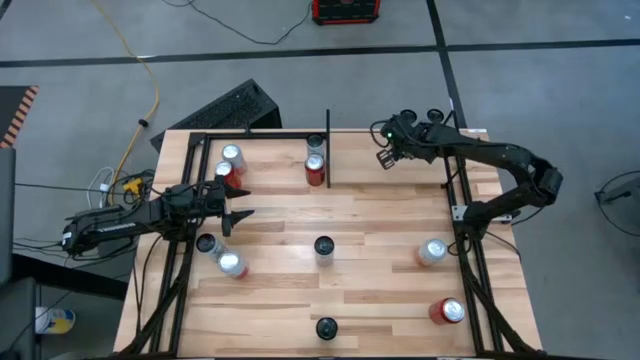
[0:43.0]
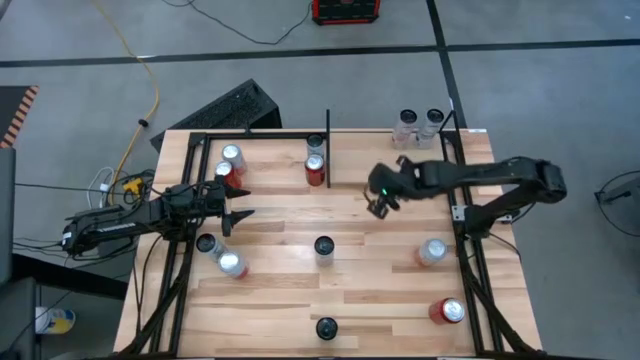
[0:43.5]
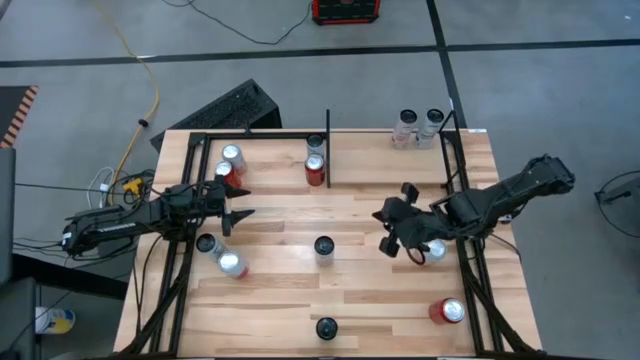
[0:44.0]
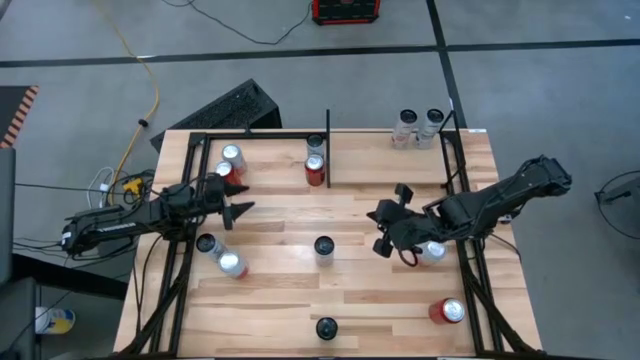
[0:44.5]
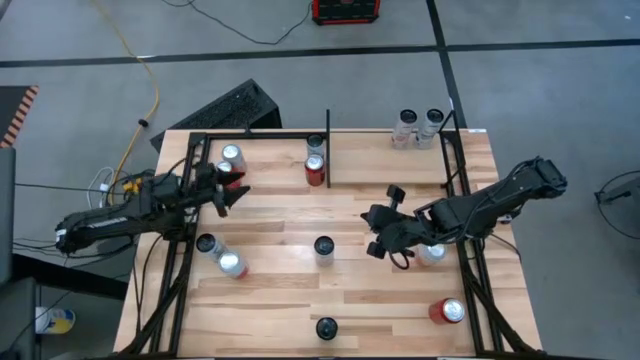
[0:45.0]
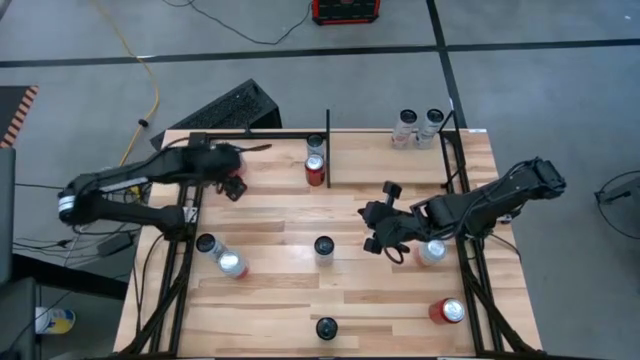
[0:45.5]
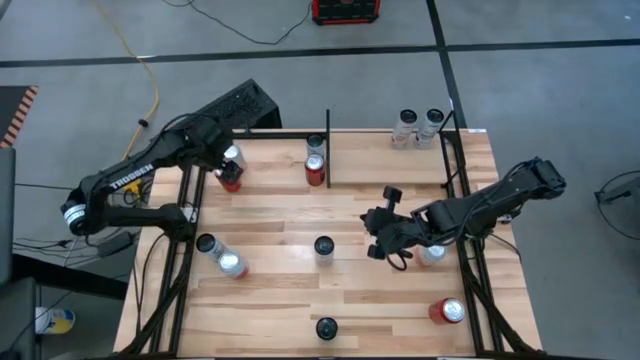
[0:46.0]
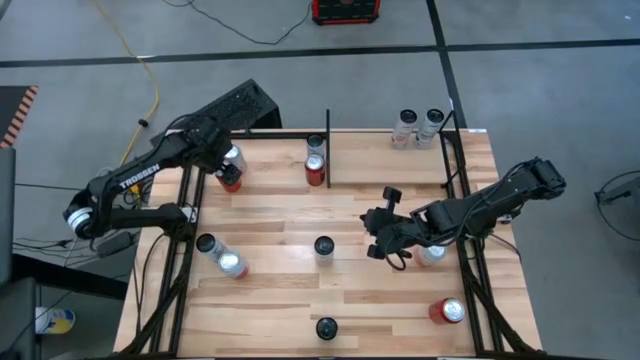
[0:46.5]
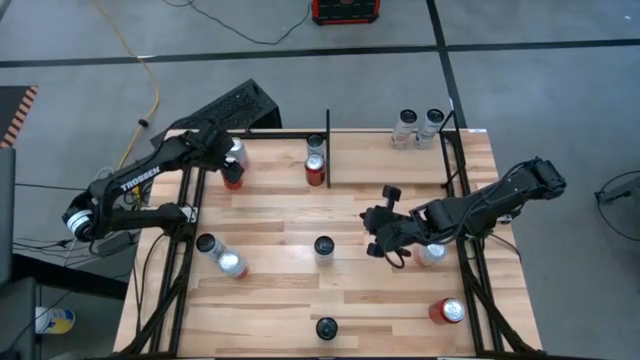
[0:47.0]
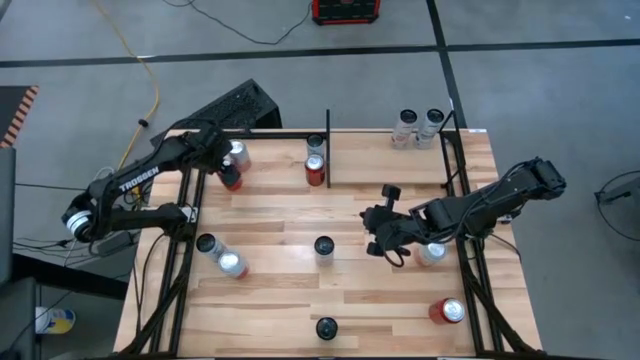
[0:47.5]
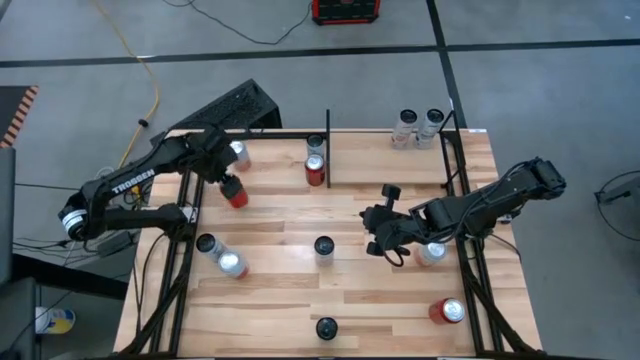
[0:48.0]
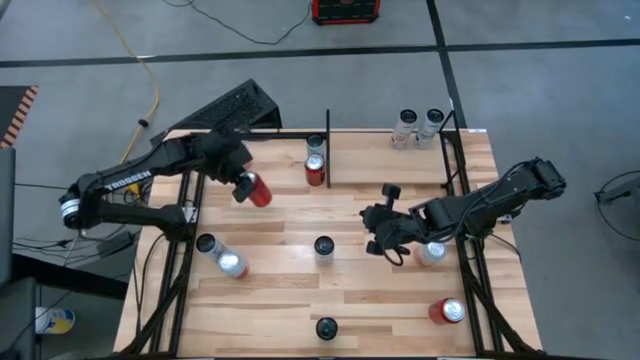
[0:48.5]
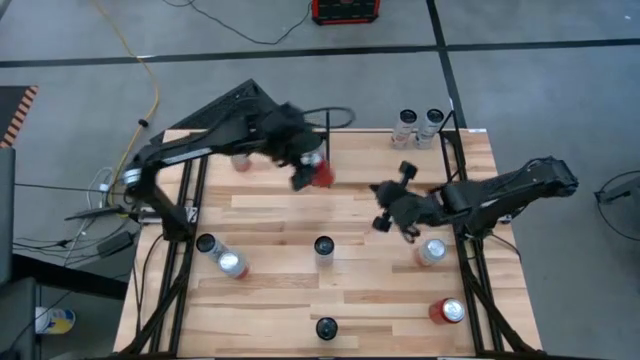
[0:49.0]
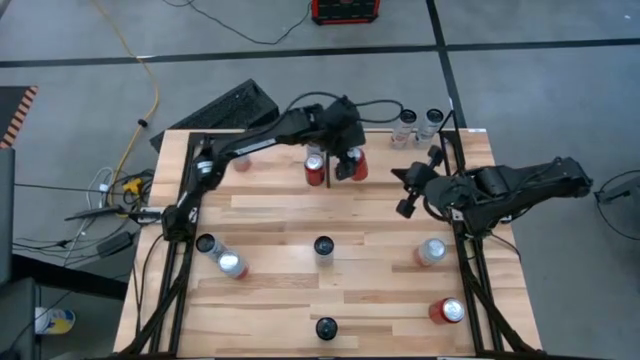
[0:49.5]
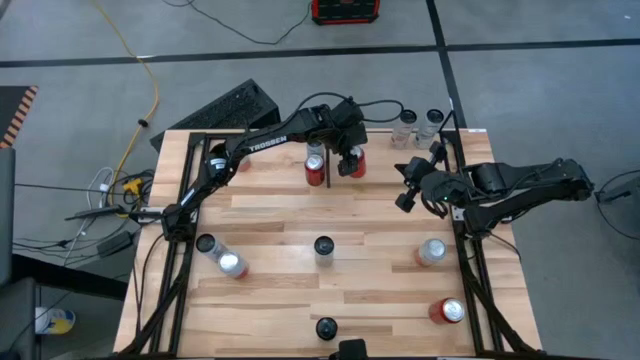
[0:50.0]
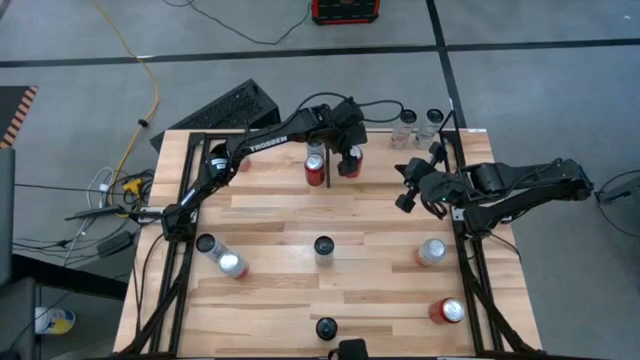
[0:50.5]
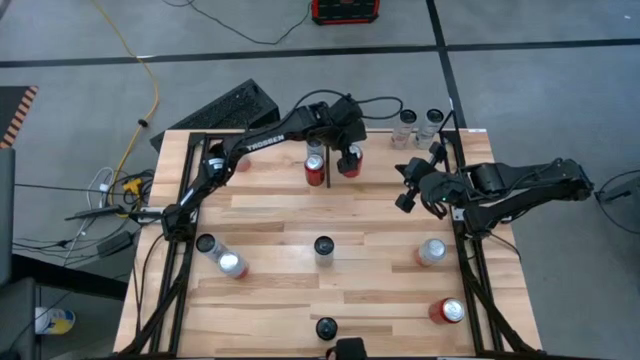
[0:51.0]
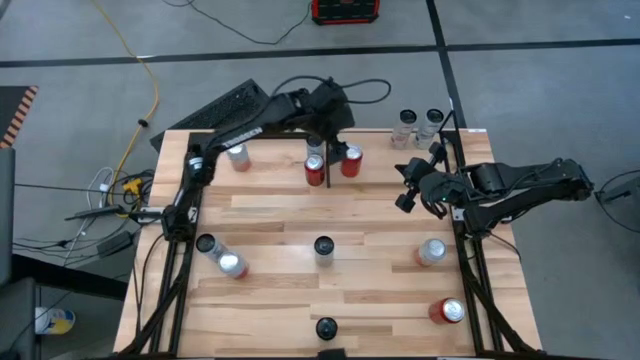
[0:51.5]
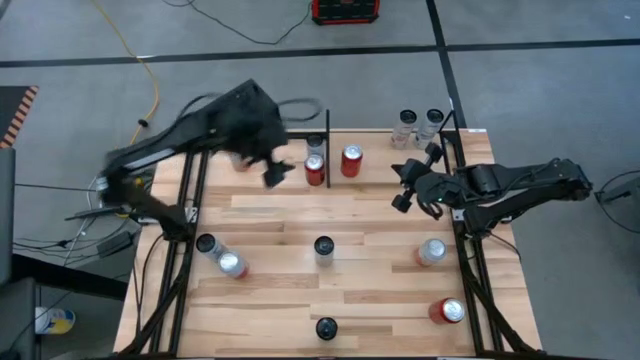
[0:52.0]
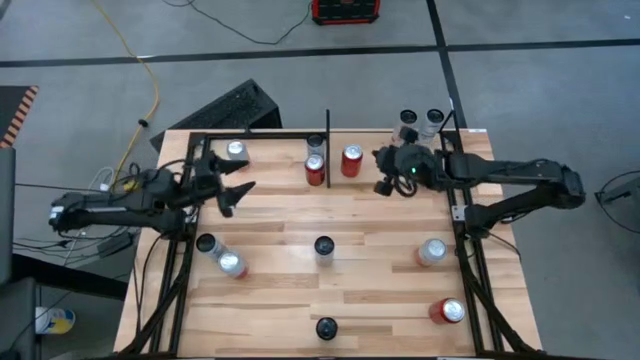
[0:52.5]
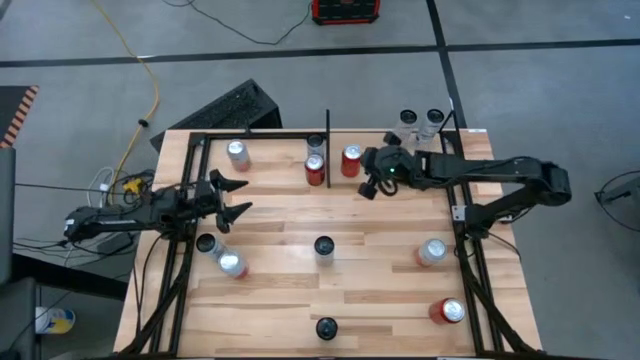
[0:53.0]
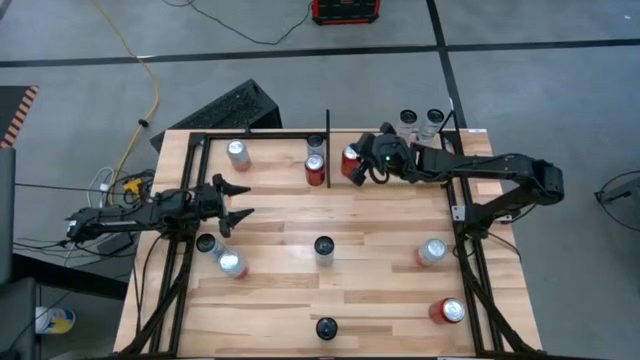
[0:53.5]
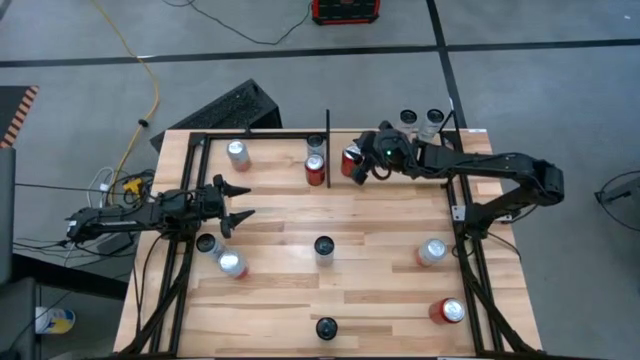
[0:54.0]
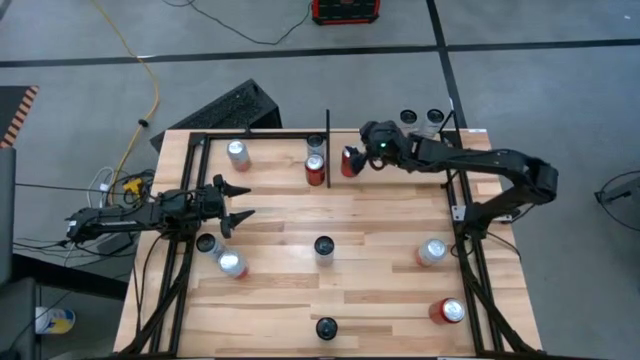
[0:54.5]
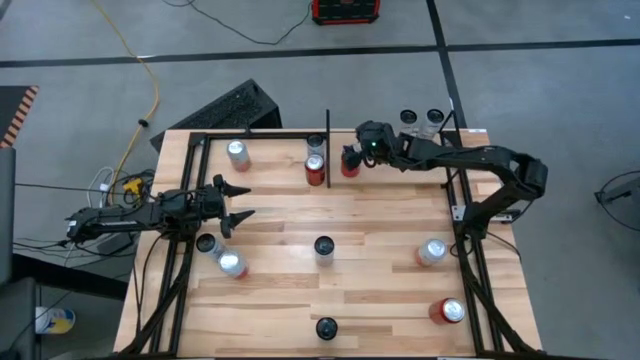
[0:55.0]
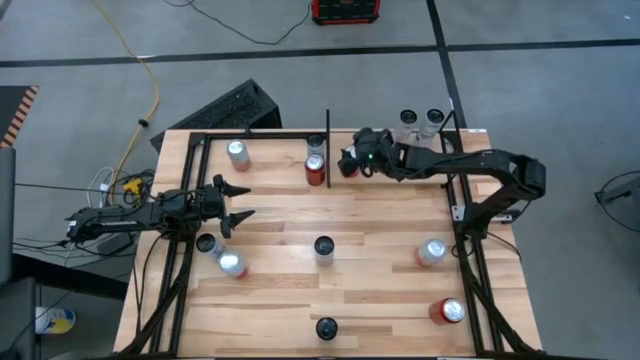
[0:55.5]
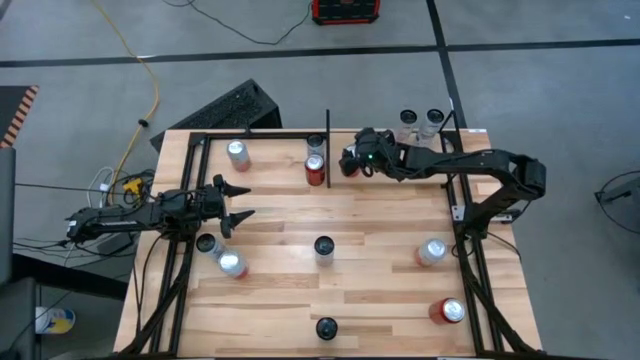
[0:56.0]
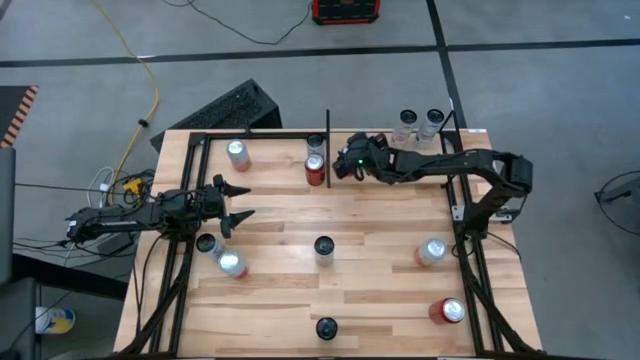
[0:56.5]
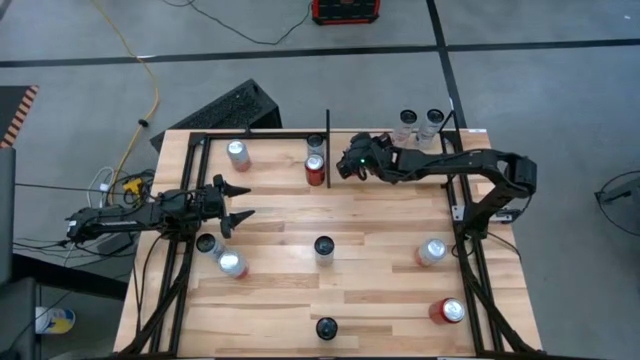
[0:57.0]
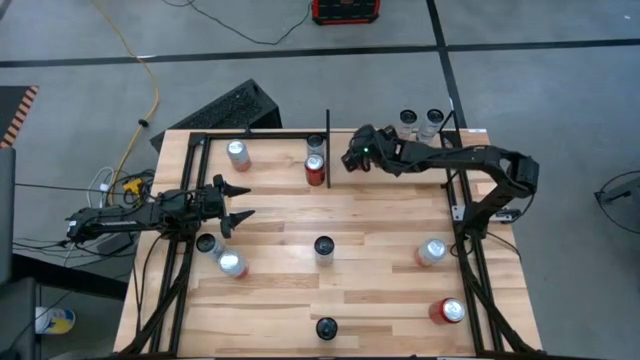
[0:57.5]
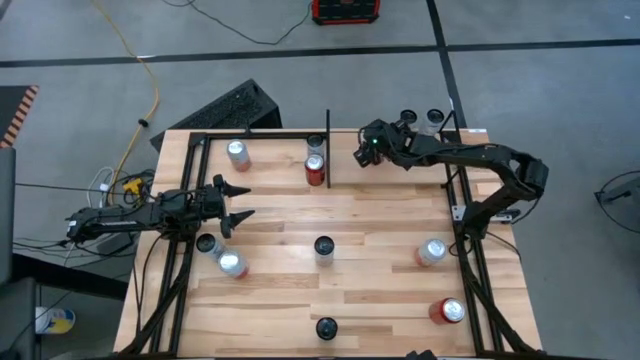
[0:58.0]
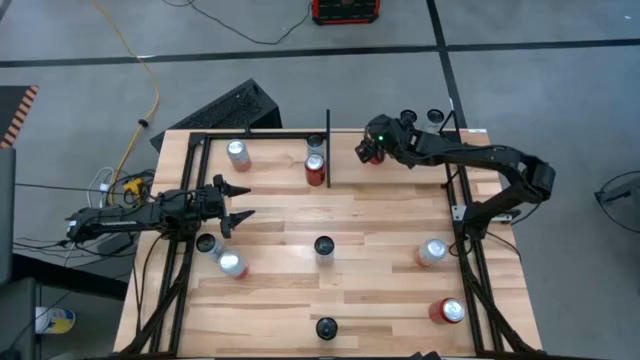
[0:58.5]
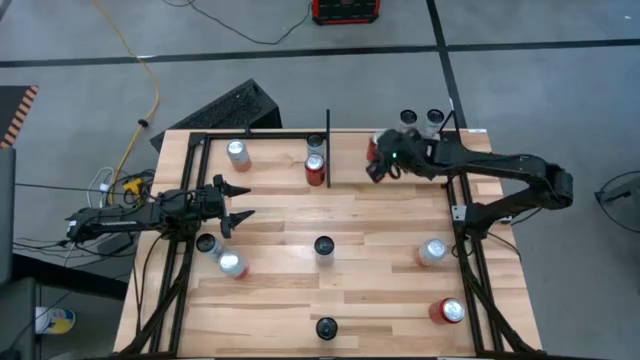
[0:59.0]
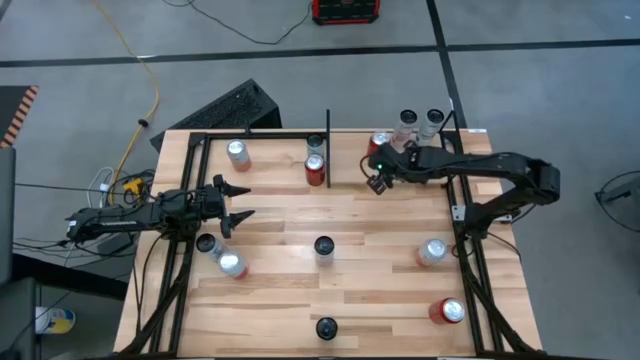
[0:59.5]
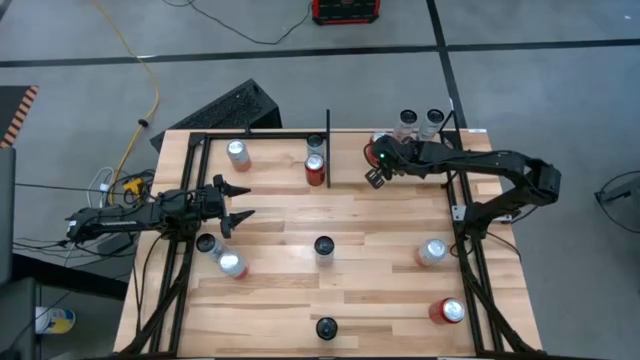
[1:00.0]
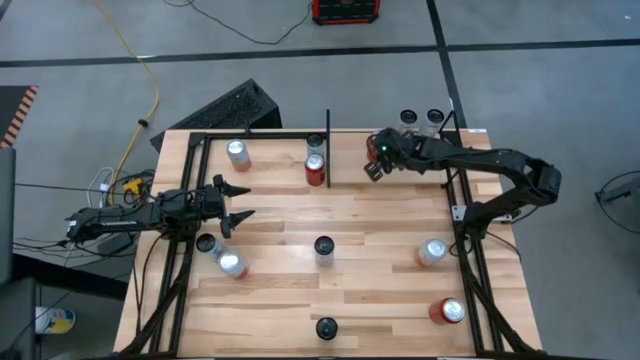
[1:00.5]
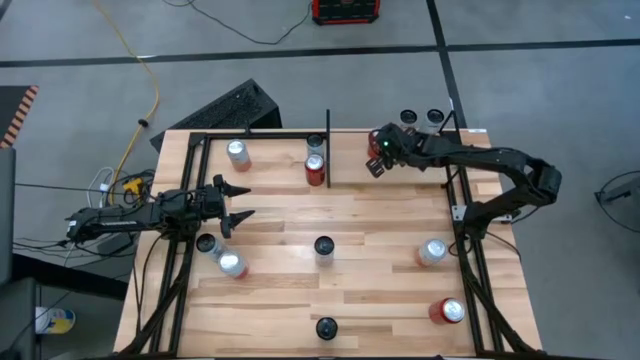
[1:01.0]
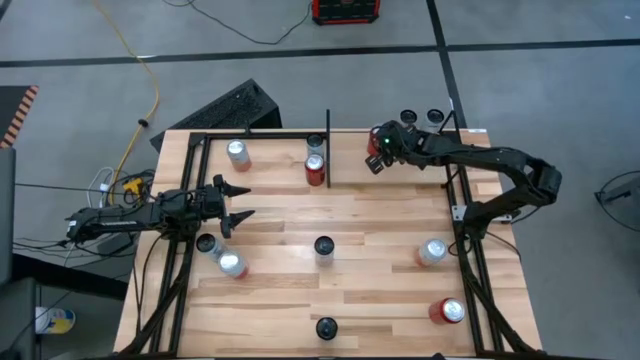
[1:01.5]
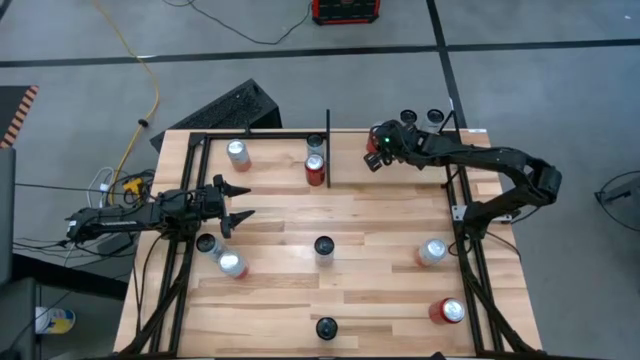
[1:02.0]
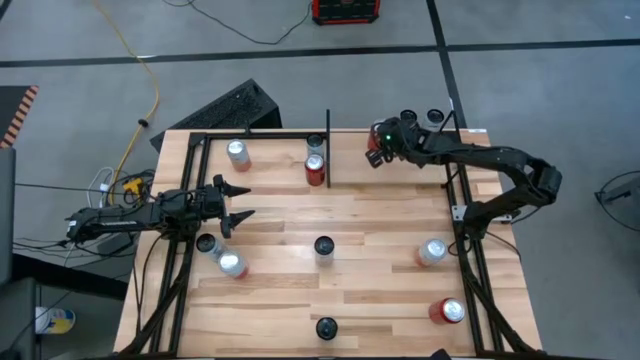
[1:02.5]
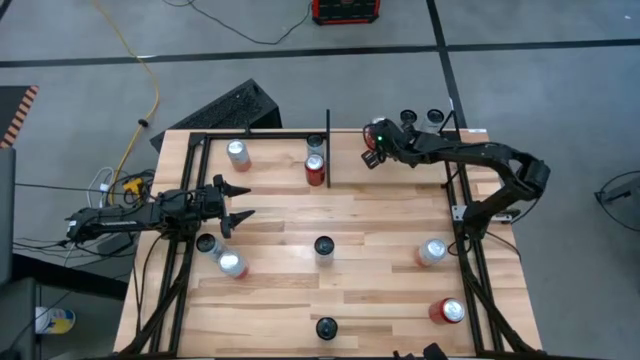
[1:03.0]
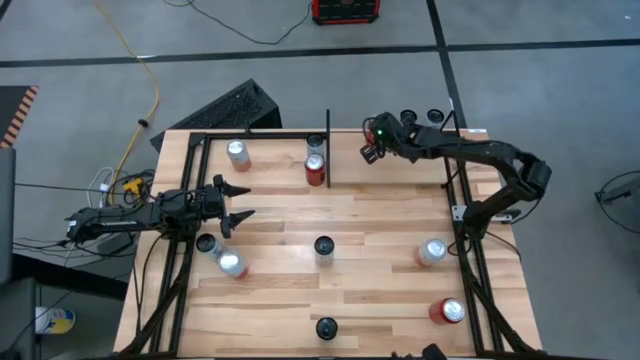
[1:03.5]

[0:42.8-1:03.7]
Task: Place canned beverage on shelf
Put the red soda can on the shelf

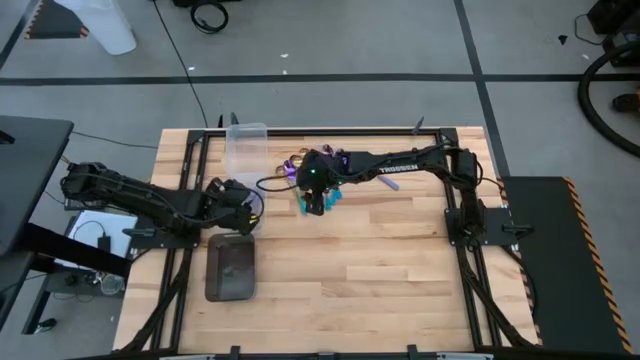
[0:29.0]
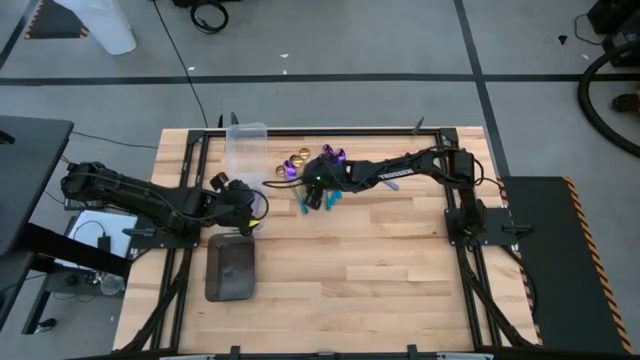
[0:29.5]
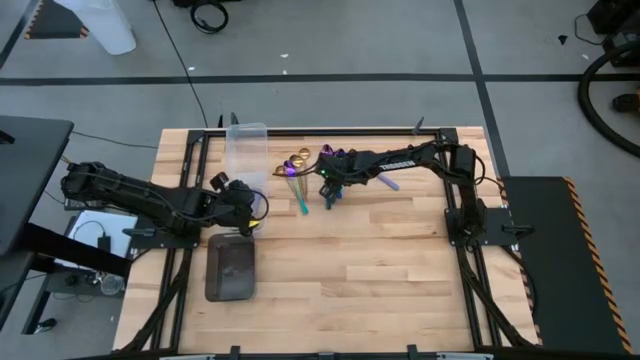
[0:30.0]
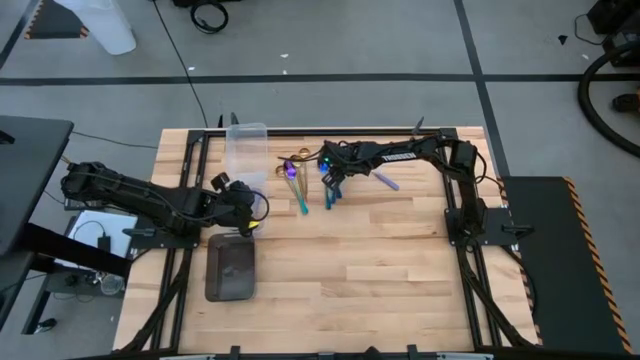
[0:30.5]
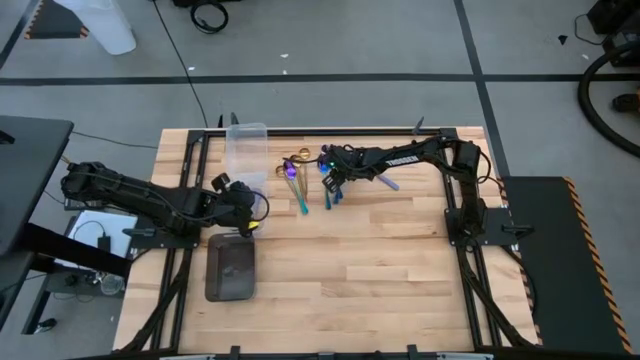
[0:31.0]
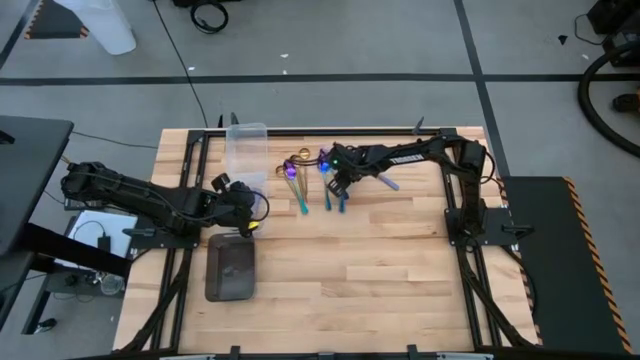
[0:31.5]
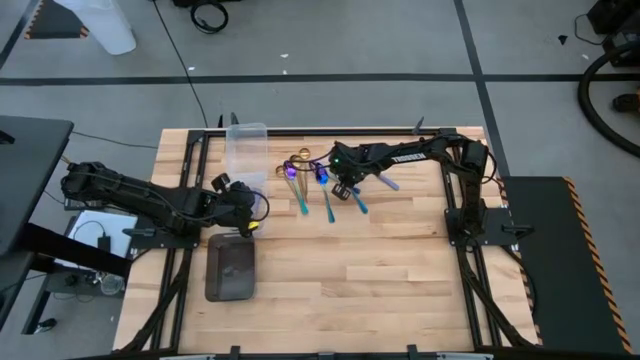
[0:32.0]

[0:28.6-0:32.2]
Task: Sort silverware by color (type)
Put the purple spoon into the top transparent bin
